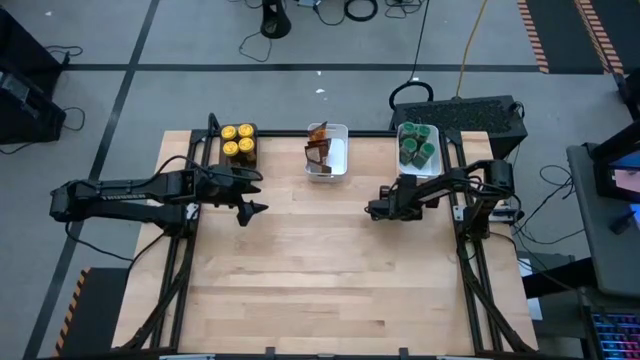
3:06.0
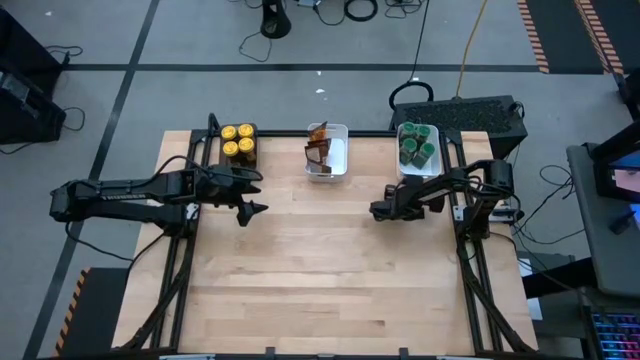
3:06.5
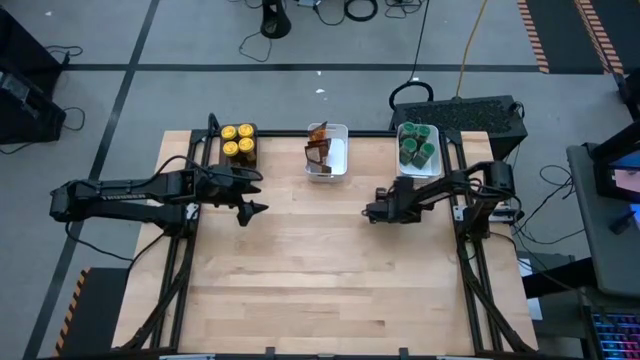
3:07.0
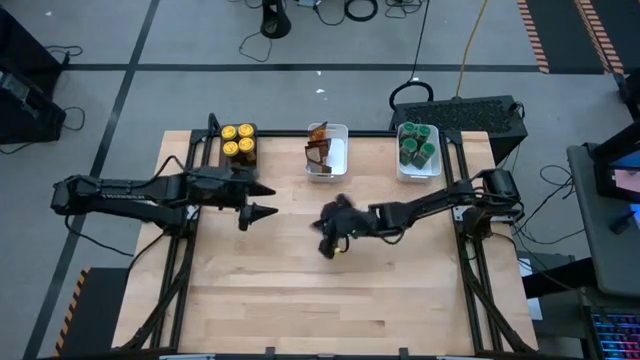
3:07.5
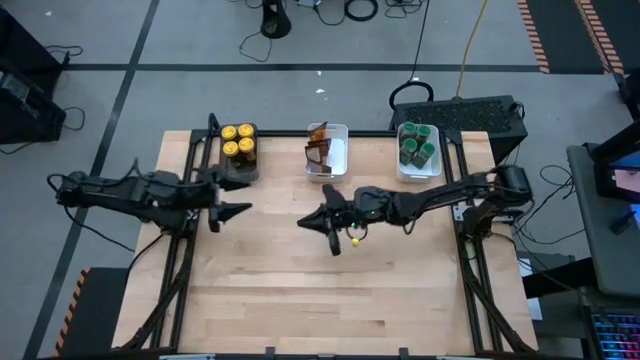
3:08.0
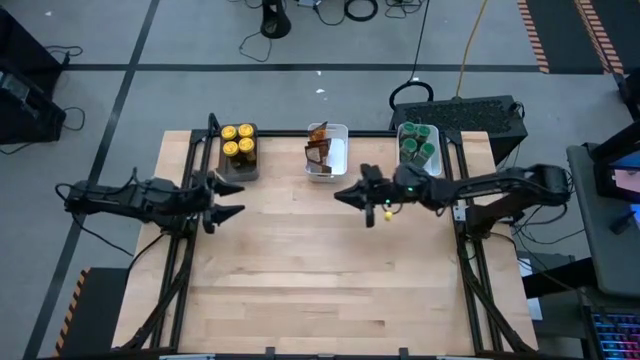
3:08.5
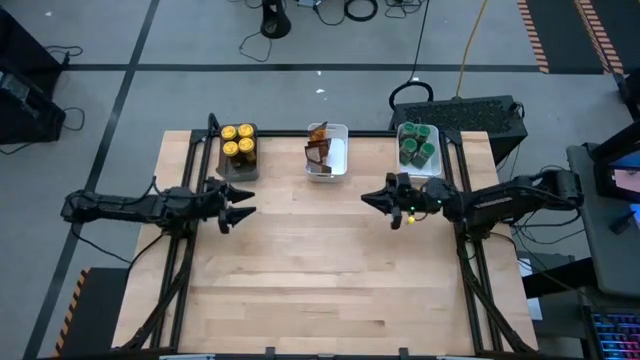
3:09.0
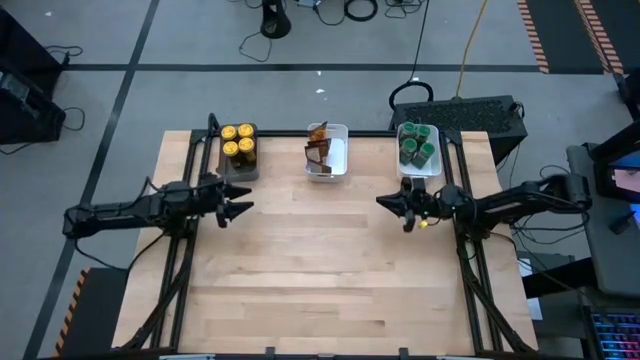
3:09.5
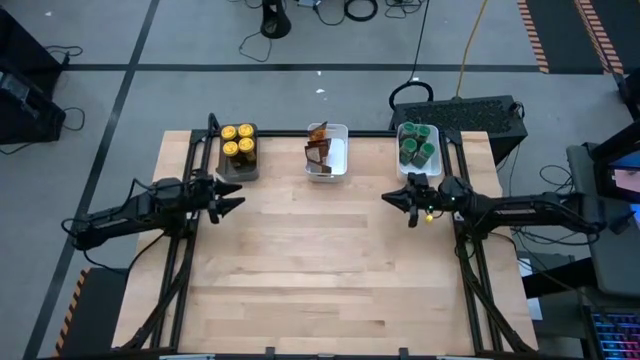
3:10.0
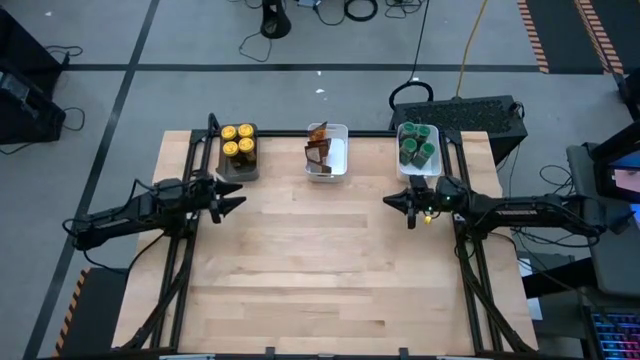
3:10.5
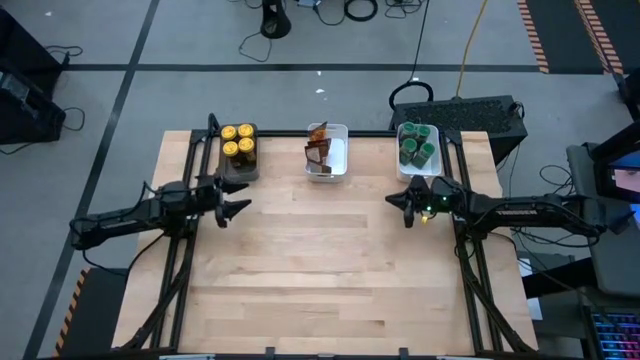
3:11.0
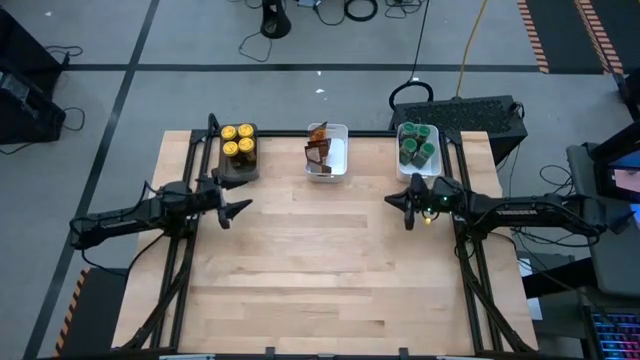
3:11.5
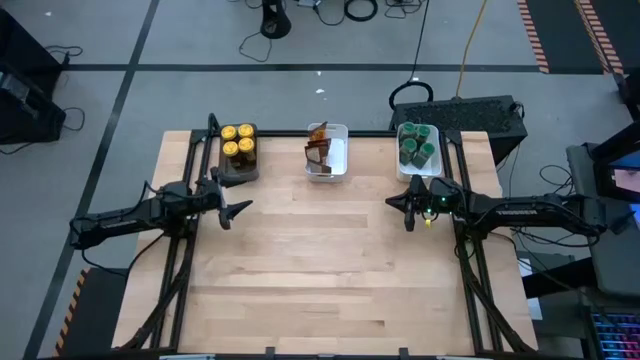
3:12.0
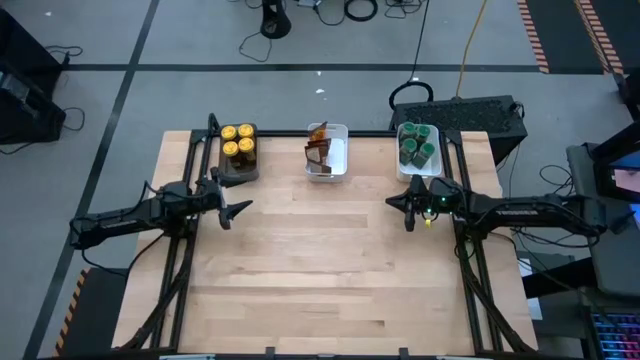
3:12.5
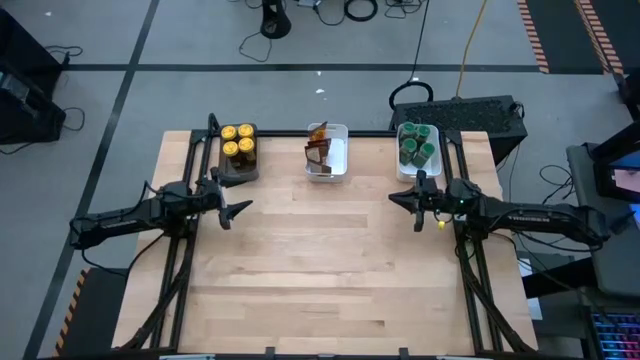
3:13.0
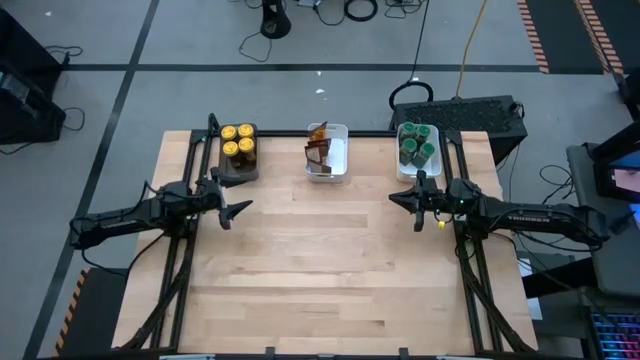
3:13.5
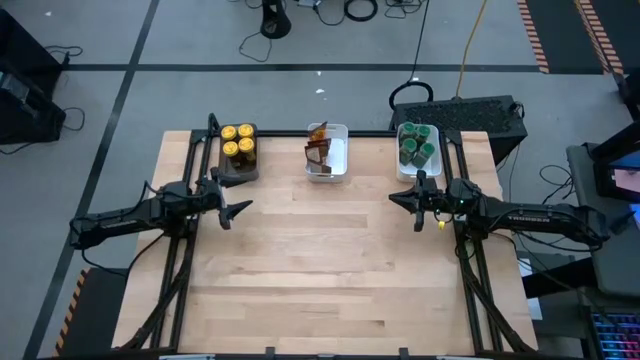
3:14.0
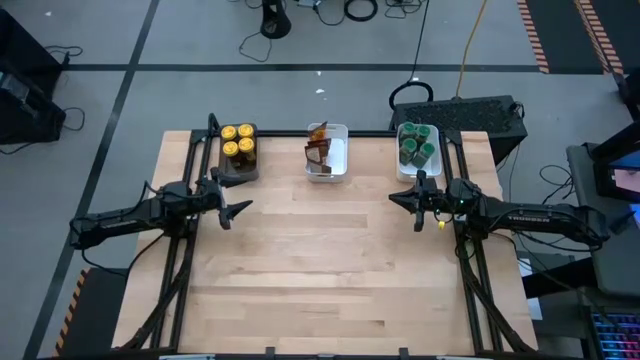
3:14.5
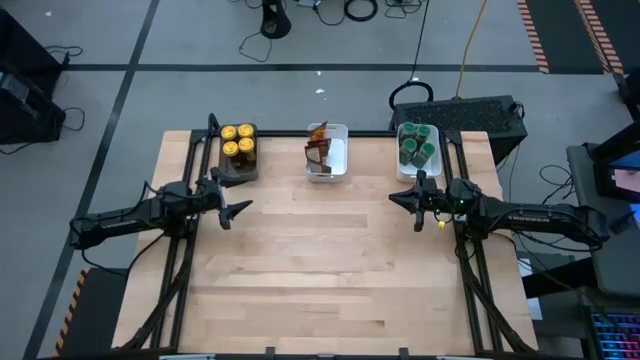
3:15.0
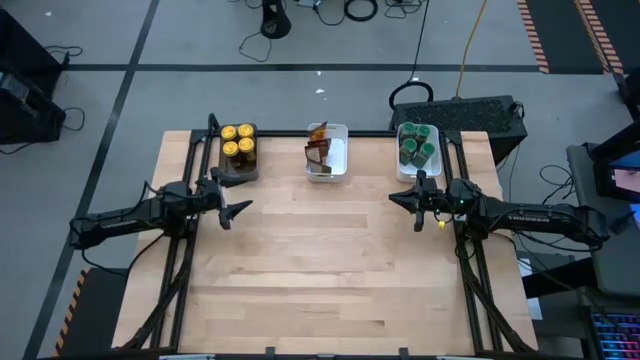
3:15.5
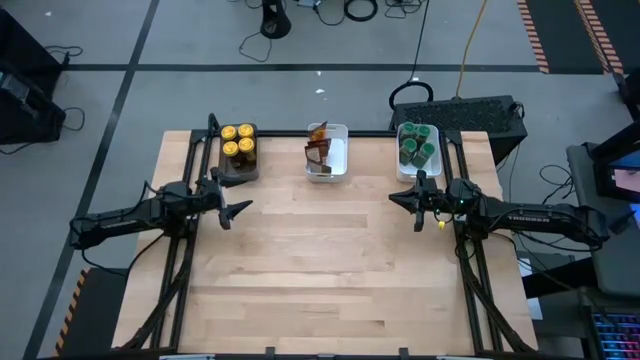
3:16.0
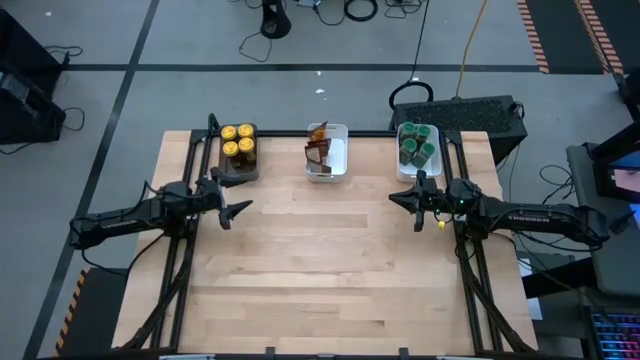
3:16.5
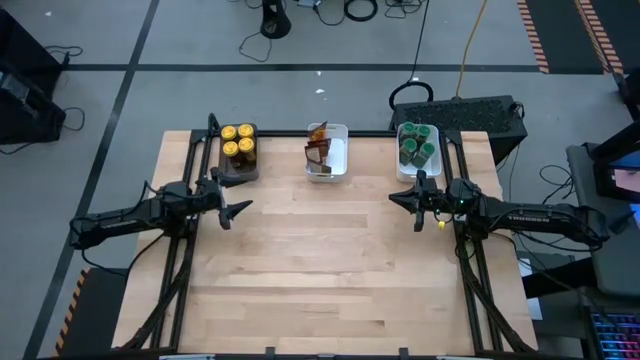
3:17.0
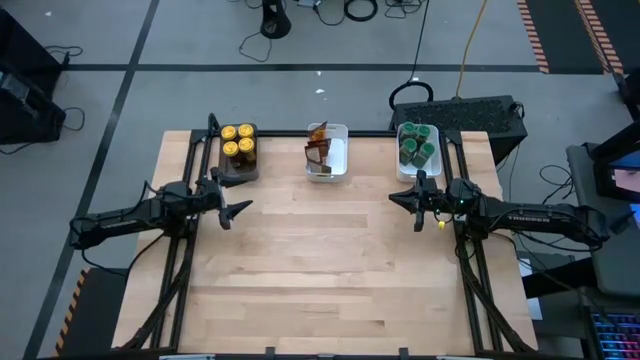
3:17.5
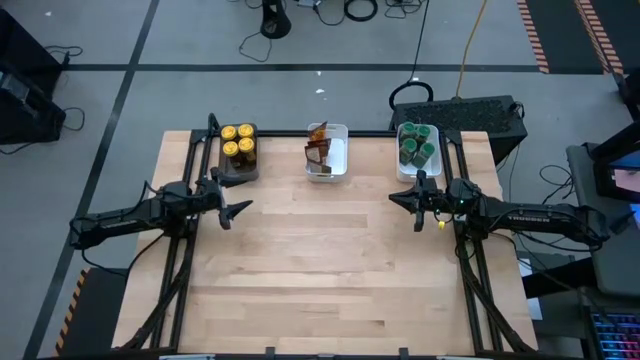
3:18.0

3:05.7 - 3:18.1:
Task: Sort spices by type
Return to Home Position

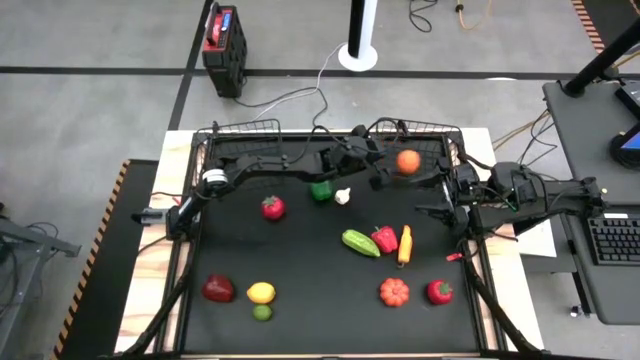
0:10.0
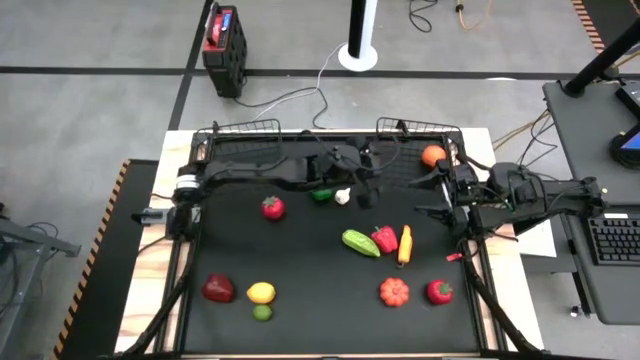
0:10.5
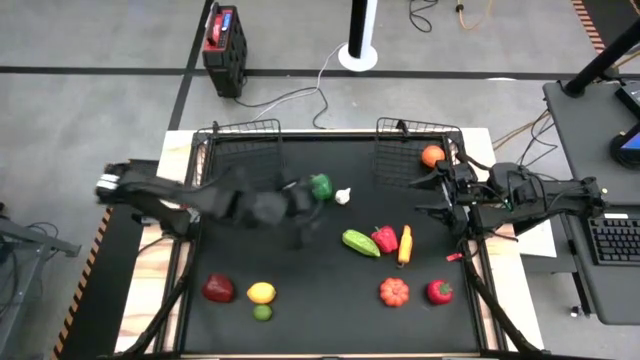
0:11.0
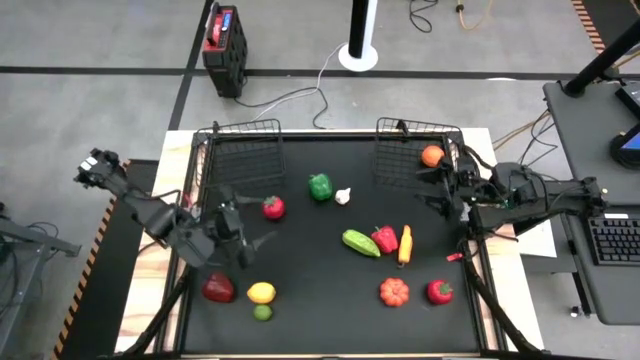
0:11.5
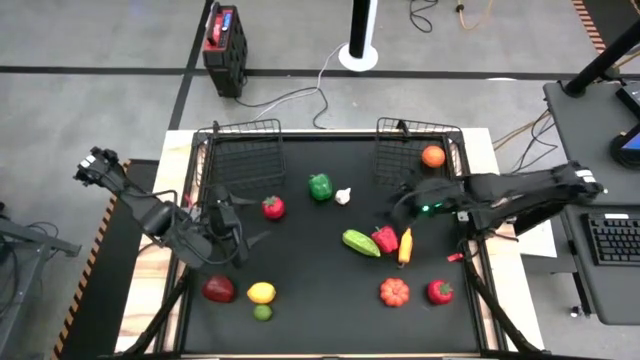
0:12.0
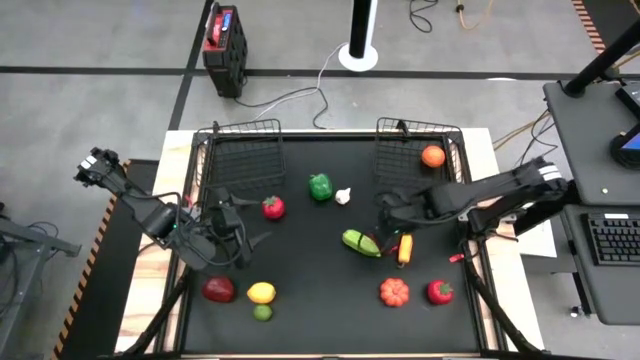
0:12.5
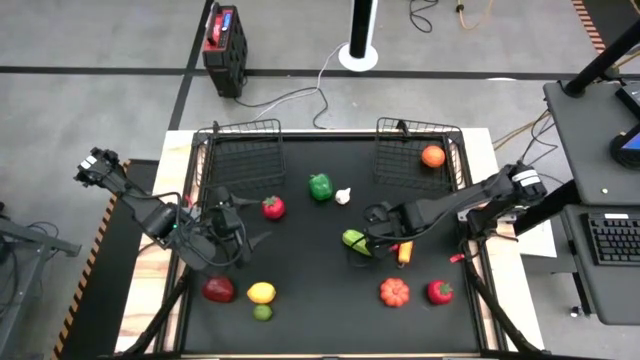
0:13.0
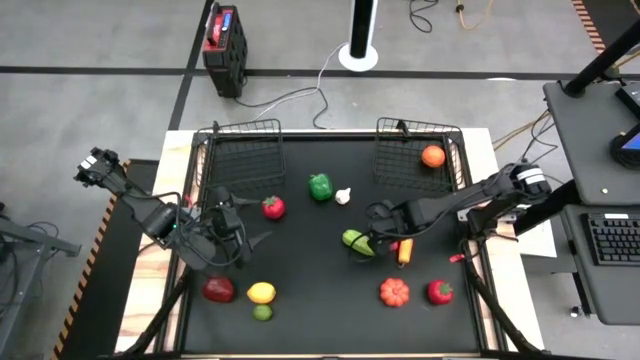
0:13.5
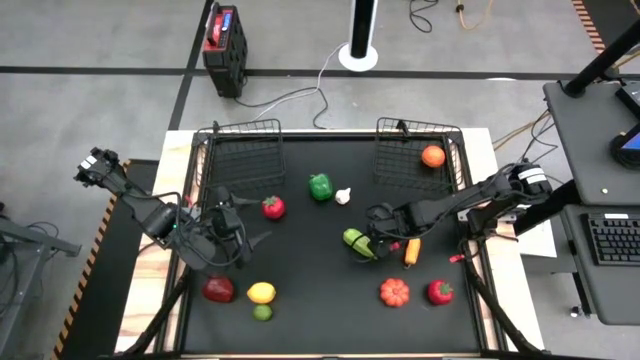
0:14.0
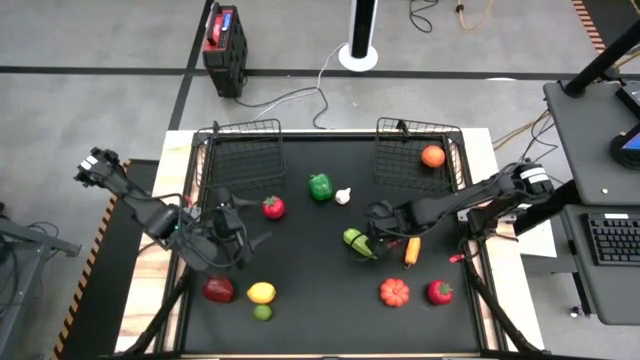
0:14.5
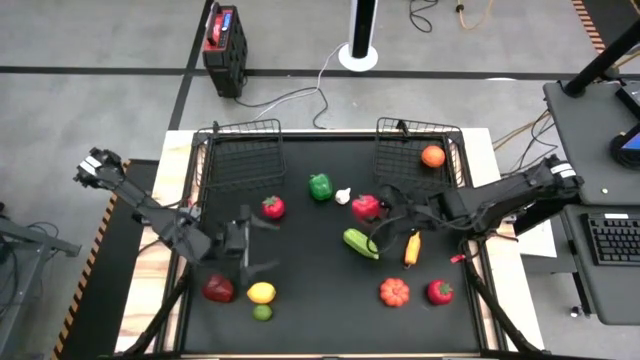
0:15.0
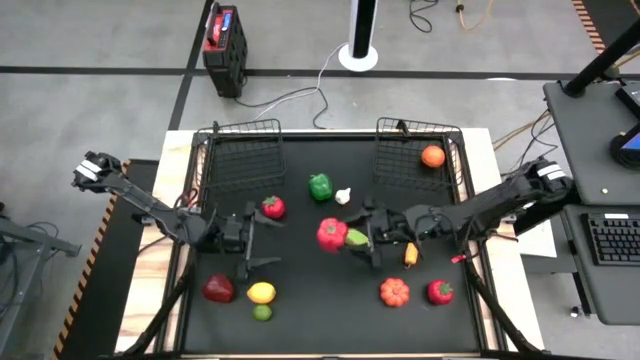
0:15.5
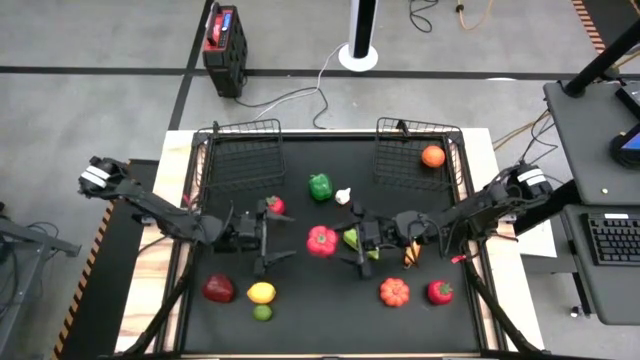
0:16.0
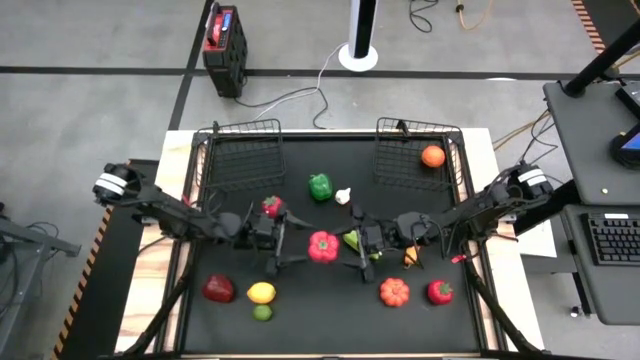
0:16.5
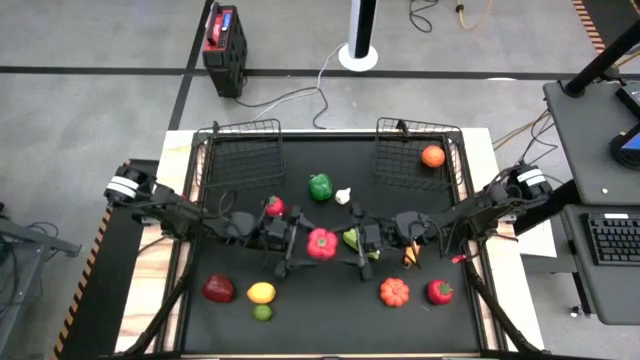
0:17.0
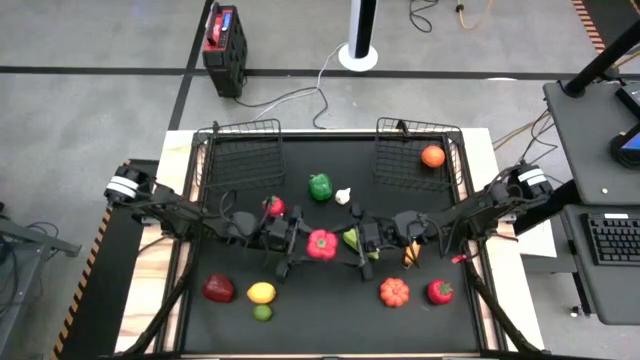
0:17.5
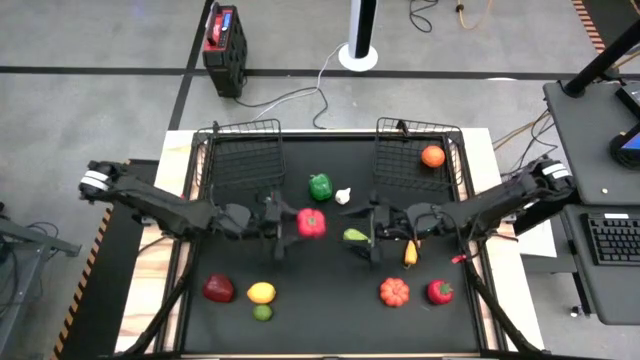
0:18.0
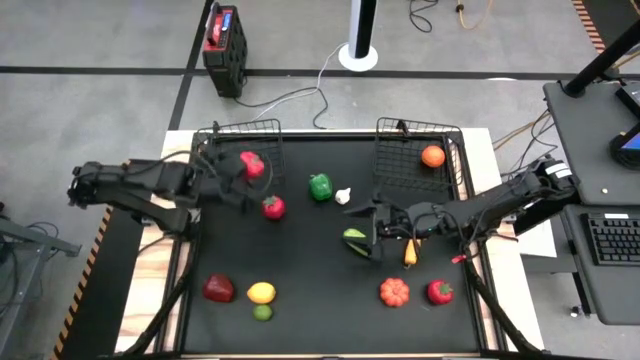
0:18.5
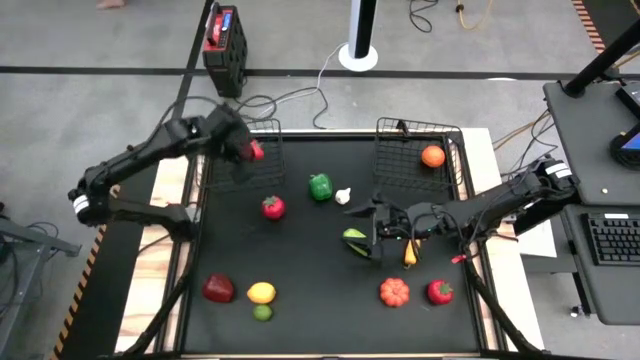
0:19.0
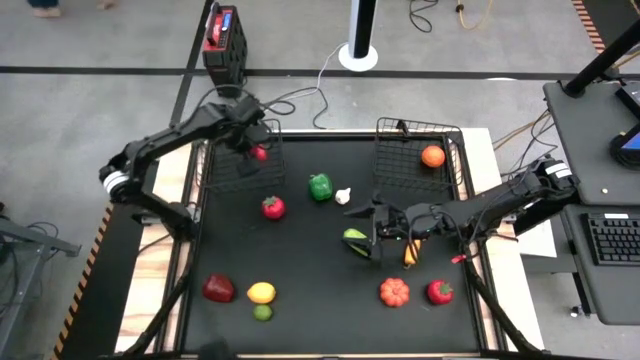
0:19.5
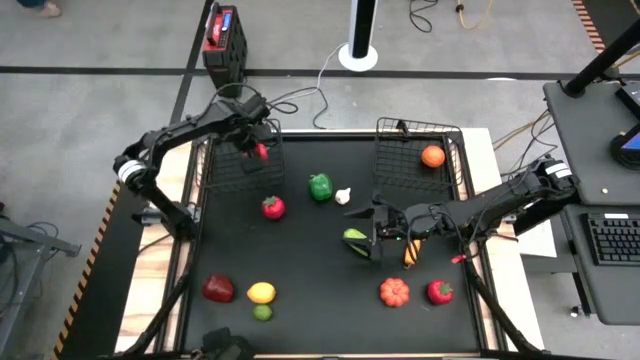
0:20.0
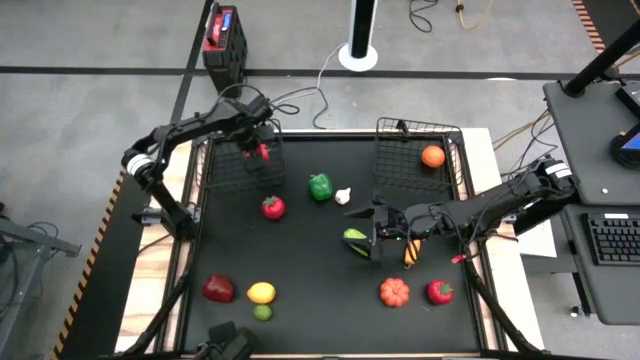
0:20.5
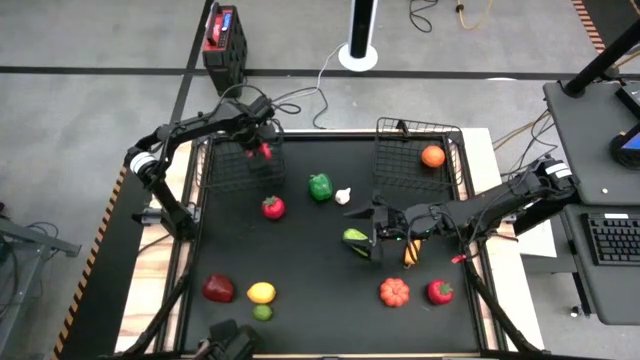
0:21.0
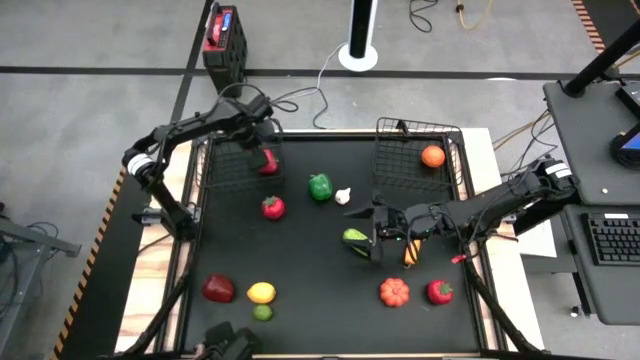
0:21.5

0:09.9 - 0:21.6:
Task: Sort produce into baskets
Put the red bell pepper into the left wire basket
